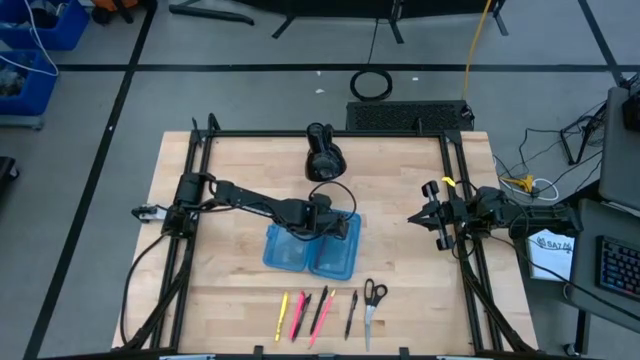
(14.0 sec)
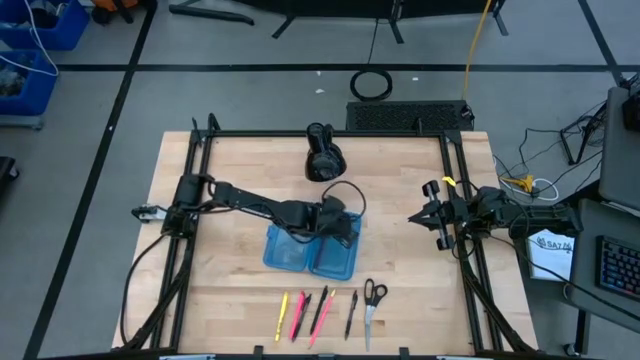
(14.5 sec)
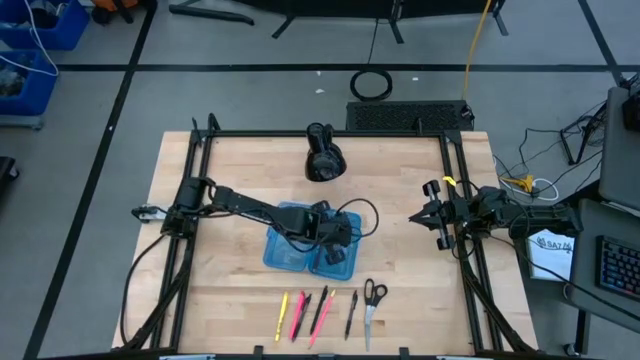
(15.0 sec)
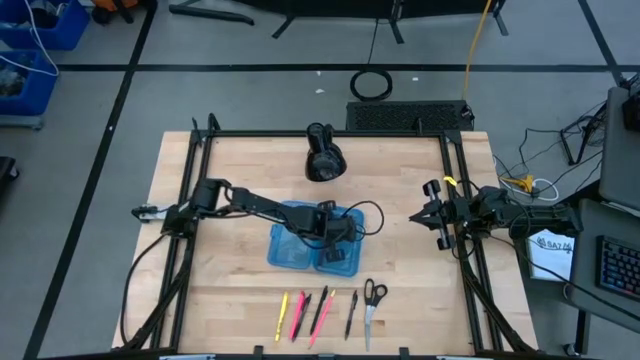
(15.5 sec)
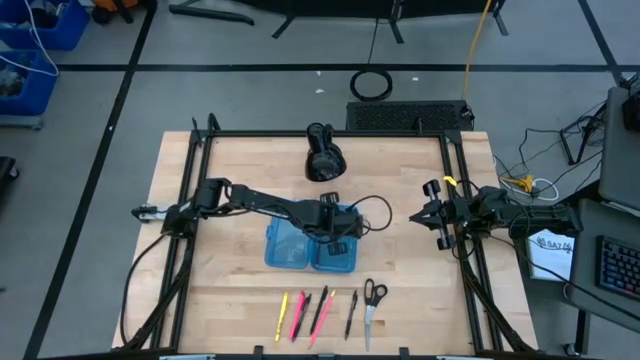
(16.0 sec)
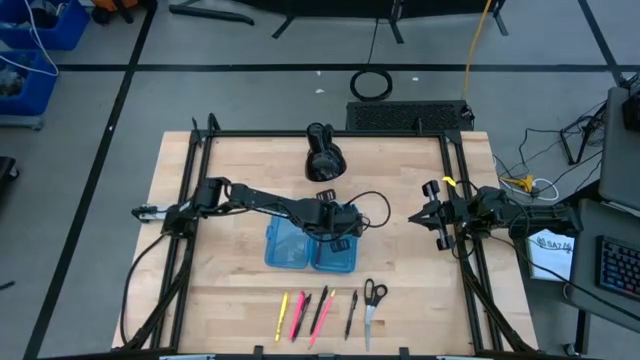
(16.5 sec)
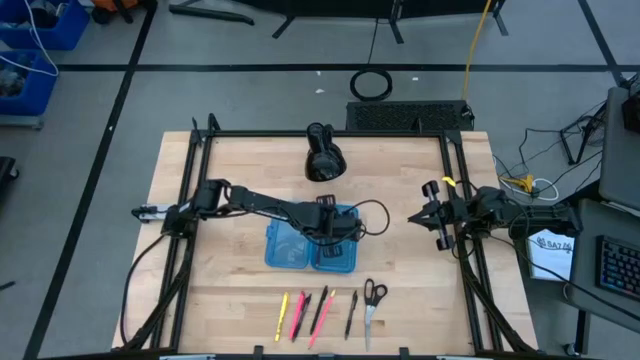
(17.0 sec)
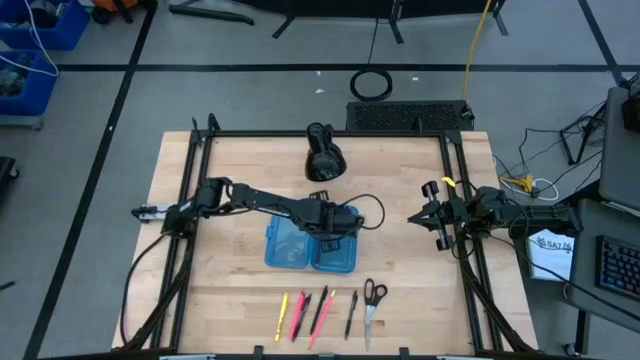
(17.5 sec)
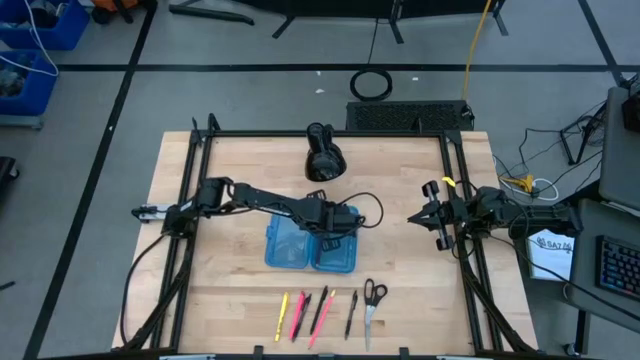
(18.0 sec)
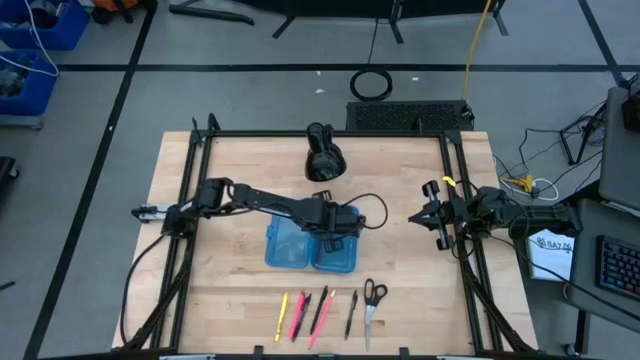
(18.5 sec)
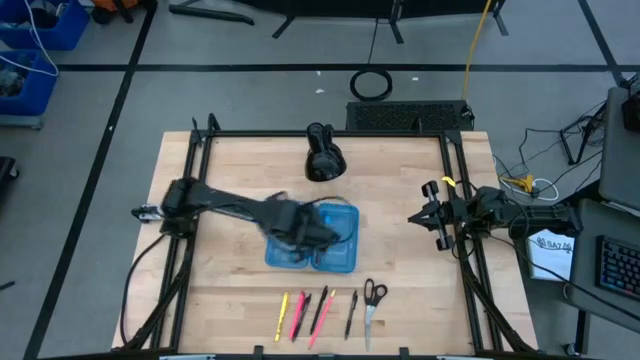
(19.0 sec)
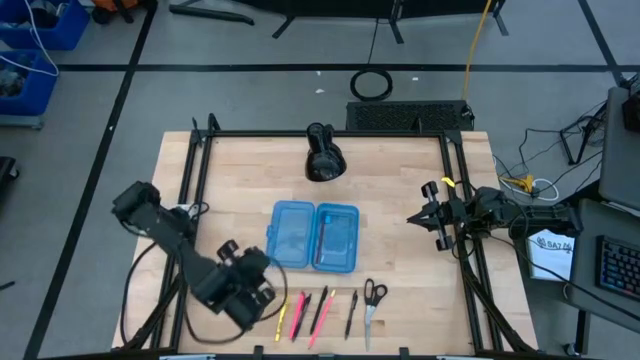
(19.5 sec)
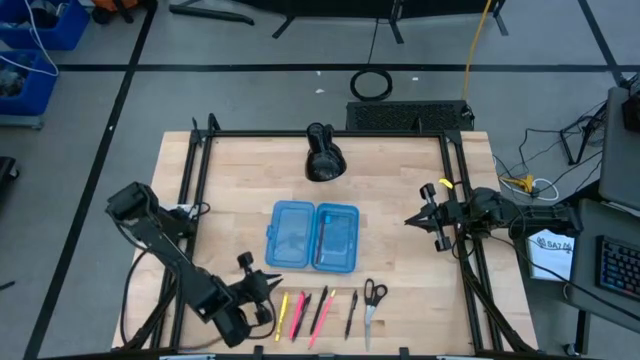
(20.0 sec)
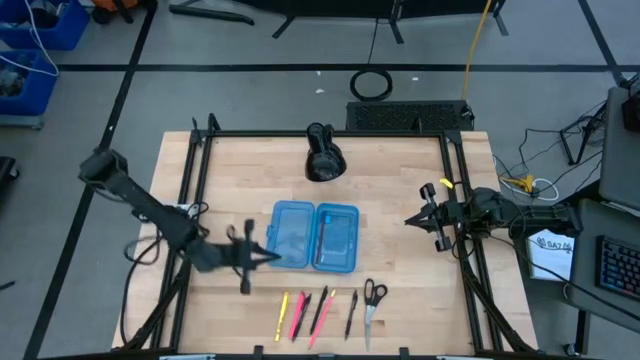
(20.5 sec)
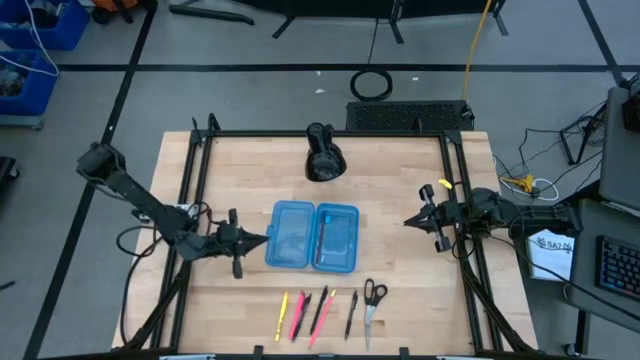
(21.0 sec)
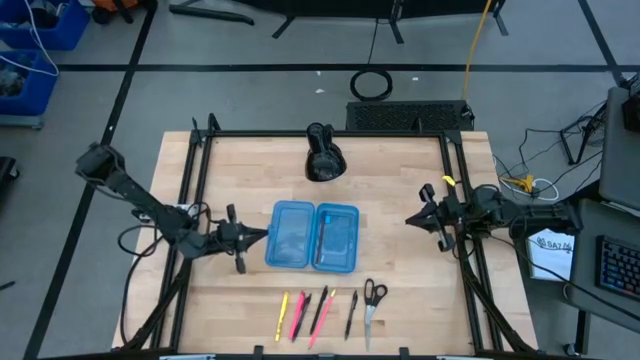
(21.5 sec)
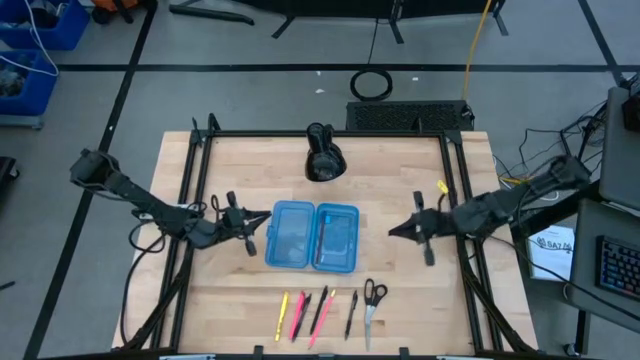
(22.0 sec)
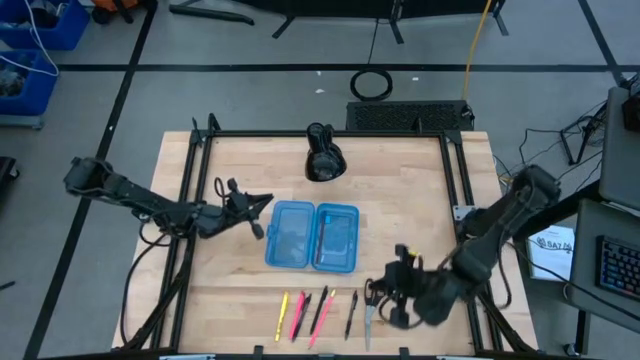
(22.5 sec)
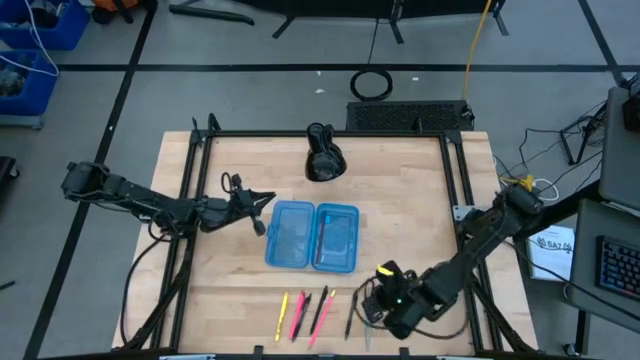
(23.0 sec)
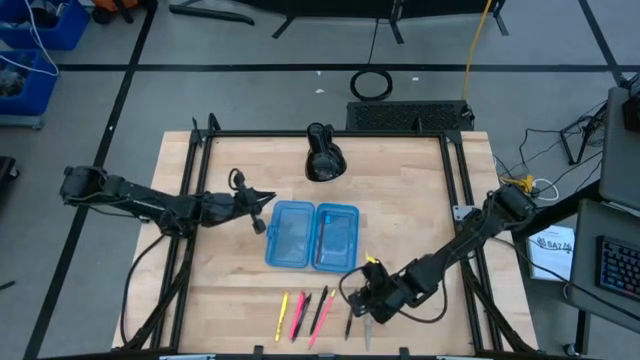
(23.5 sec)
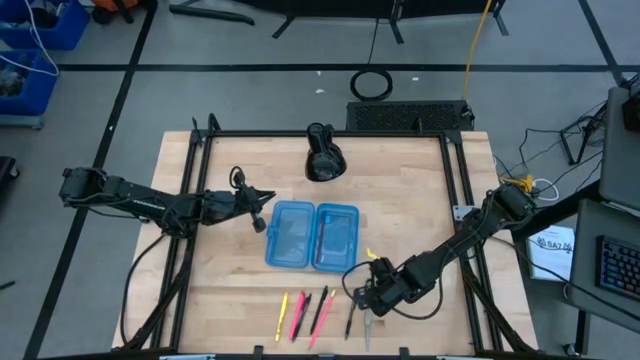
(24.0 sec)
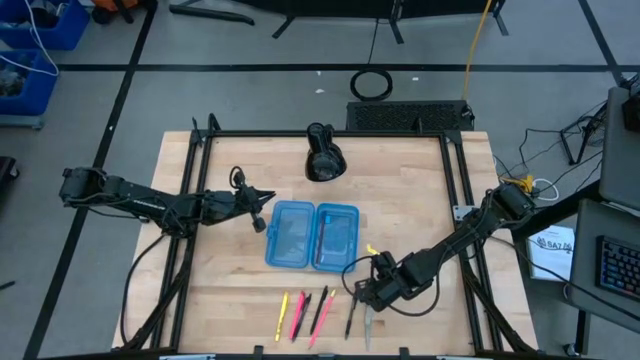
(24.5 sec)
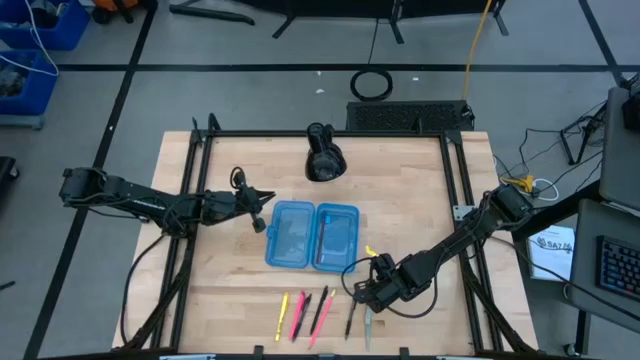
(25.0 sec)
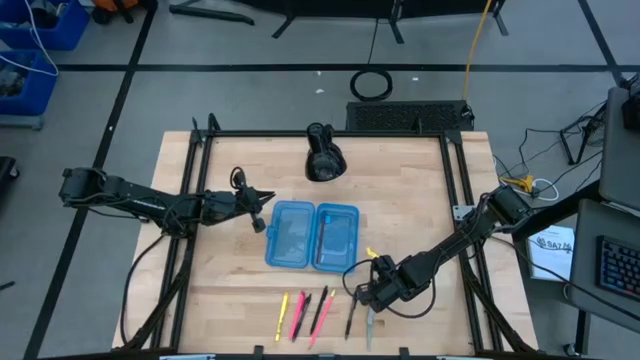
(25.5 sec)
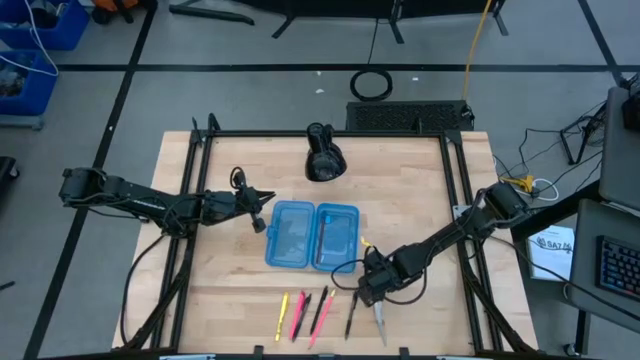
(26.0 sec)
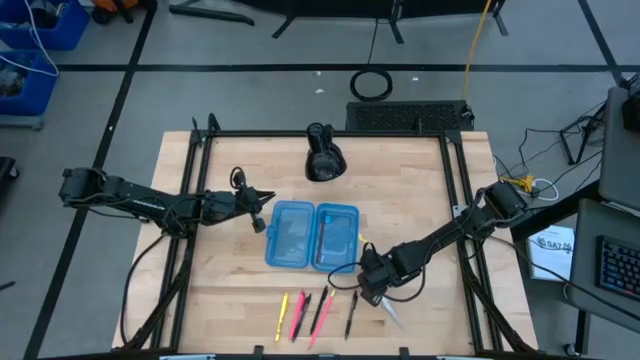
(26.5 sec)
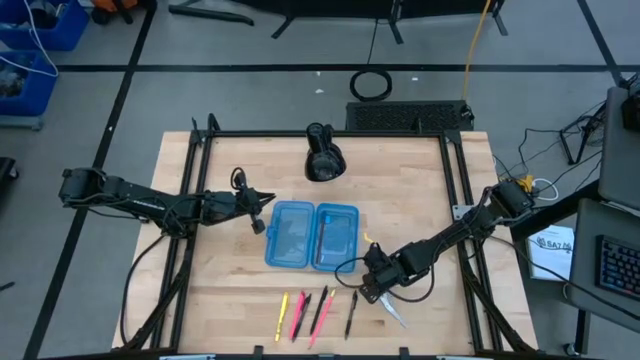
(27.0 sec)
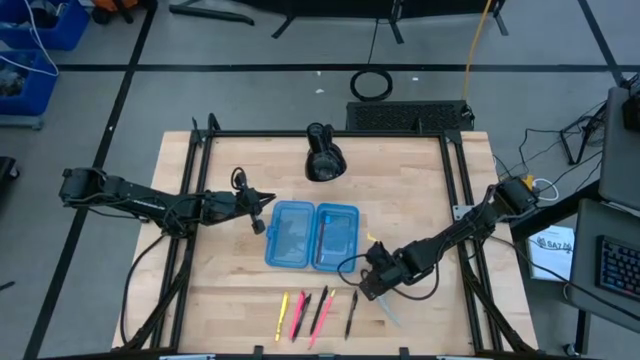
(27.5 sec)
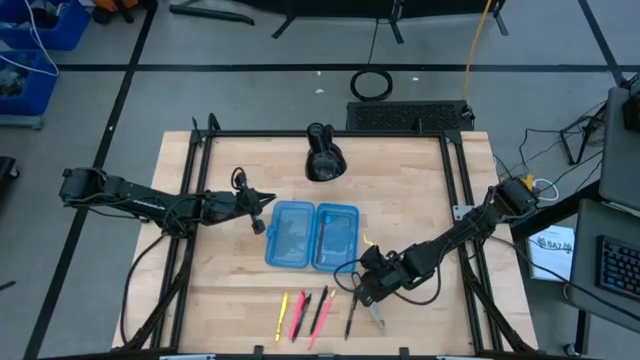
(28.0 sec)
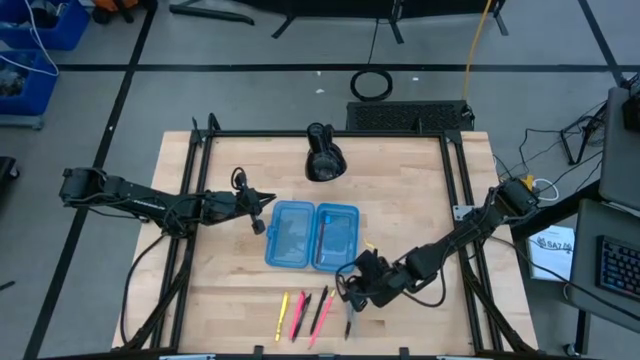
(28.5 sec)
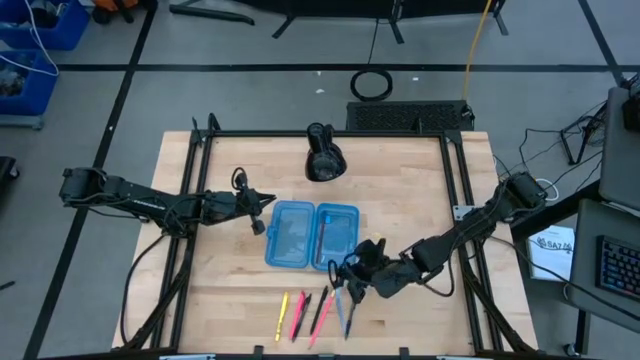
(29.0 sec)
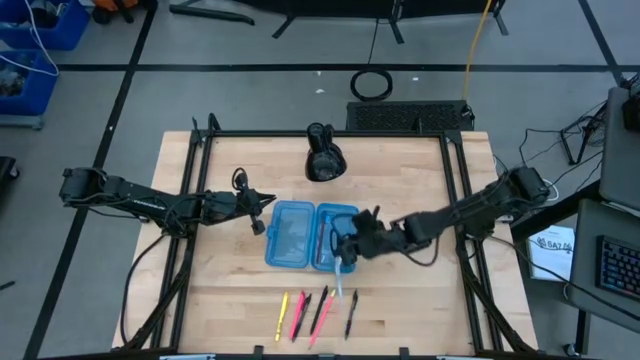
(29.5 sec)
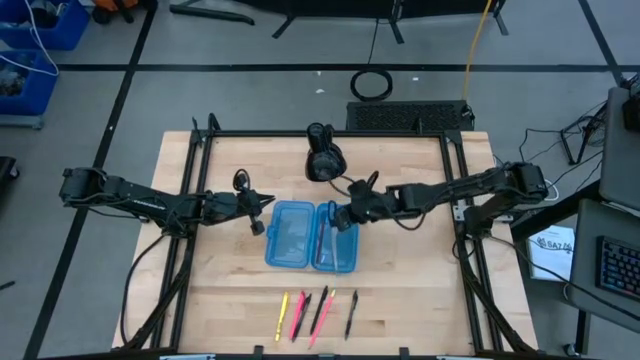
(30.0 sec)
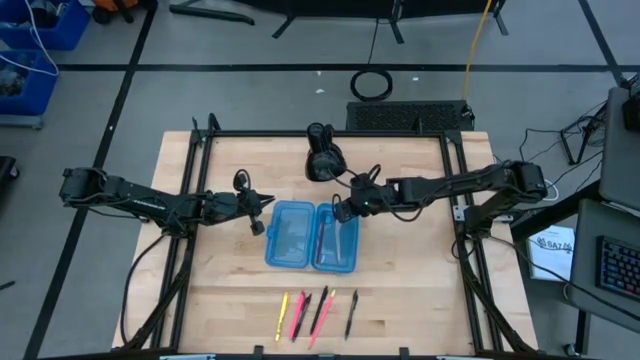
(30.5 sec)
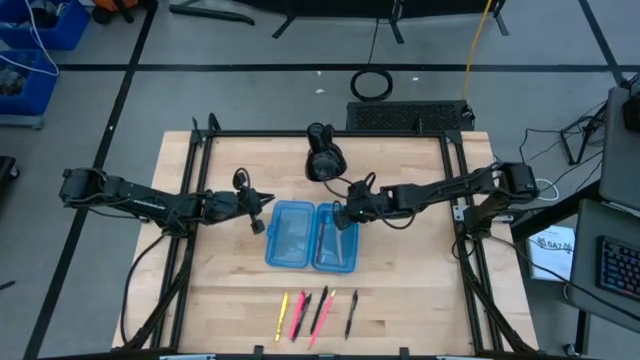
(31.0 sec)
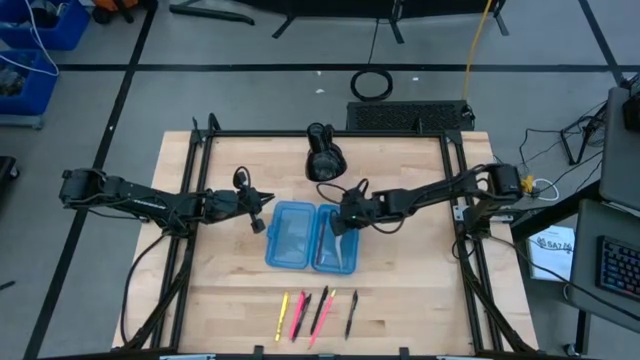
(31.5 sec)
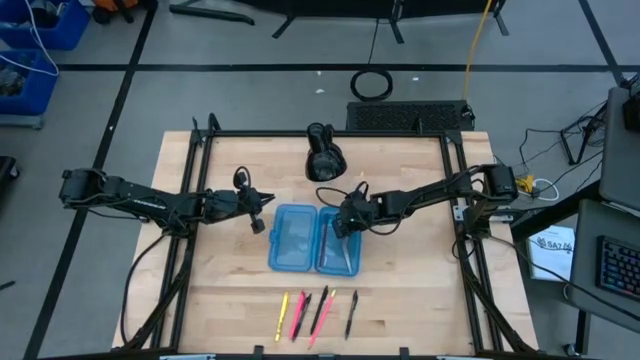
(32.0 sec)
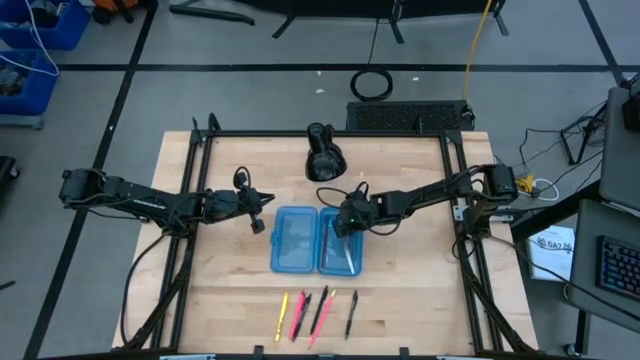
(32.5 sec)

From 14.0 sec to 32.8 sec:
Task: Pick & place school supplies into a supply box
Put the black scissors into the blue supply box

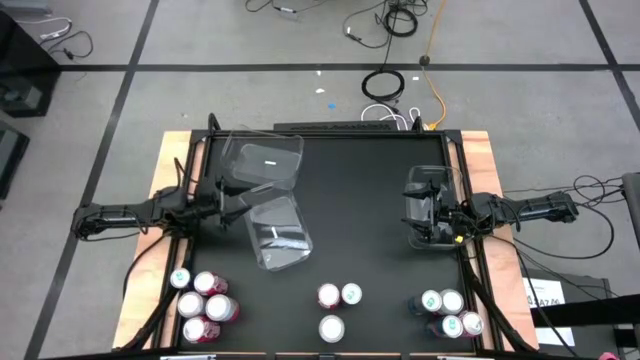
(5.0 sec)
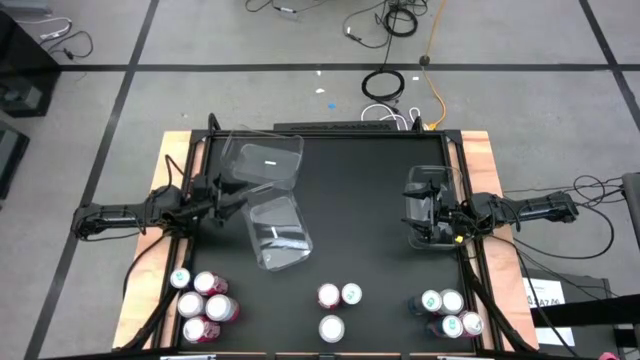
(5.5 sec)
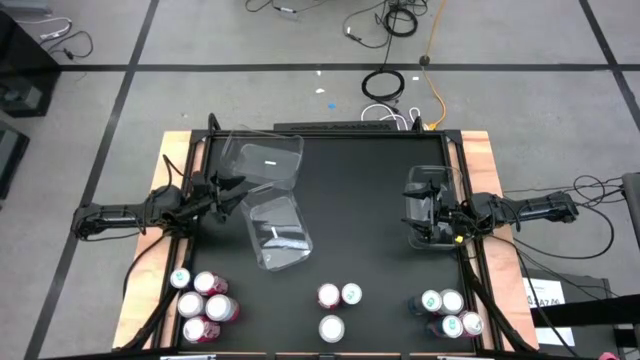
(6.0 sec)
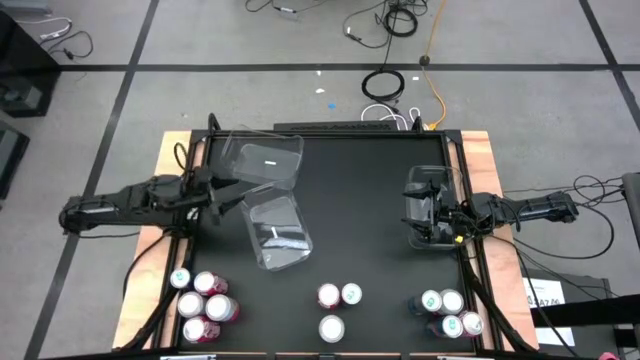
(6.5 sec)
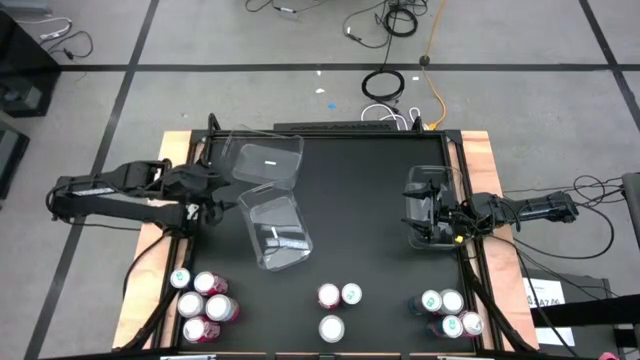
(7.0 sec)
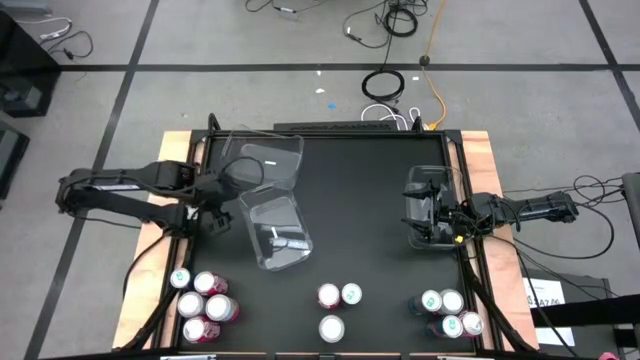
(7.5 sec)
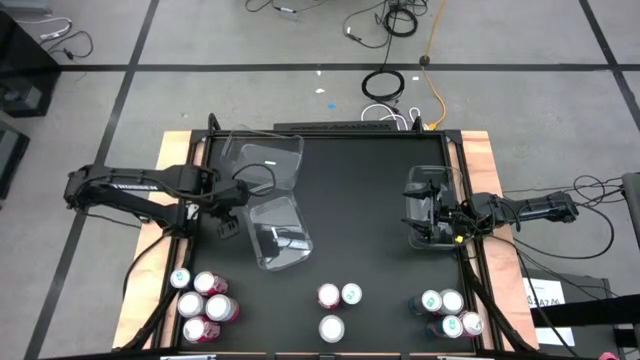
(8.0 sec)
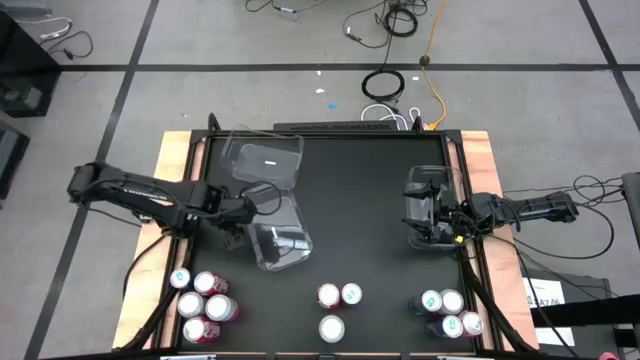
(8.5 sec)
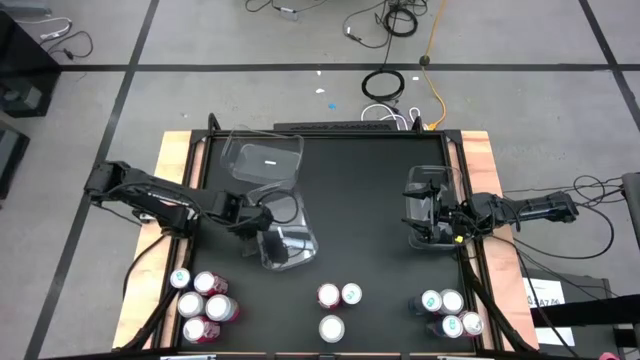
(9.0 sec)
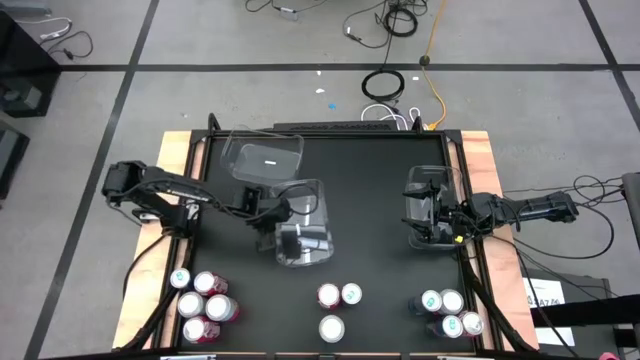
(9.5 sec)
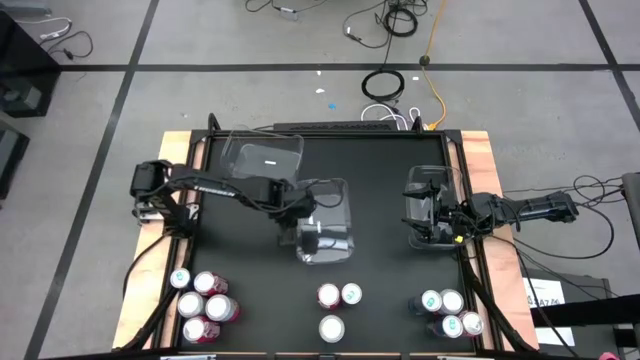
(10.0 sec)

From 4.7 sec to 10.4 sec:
Task: Sort soda cans
Move the bottom left transparent bin to the center of the table
